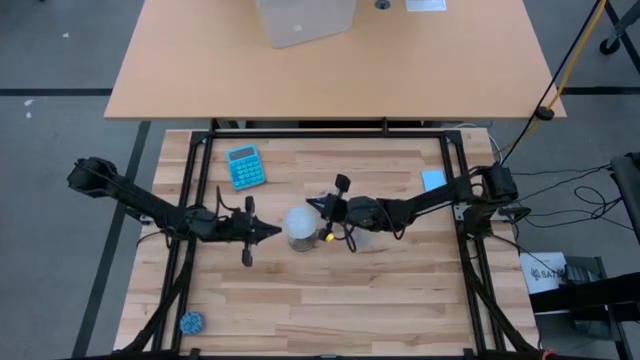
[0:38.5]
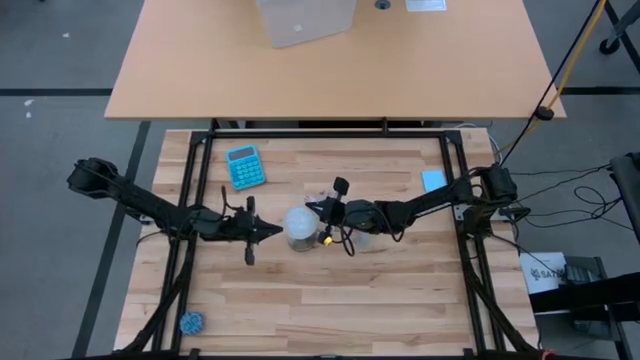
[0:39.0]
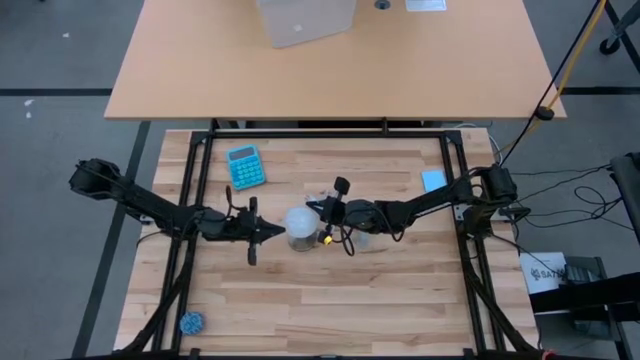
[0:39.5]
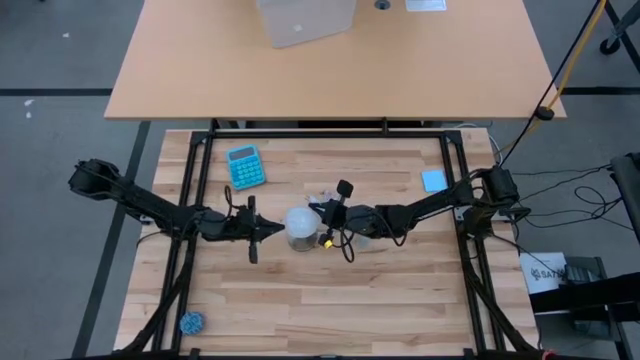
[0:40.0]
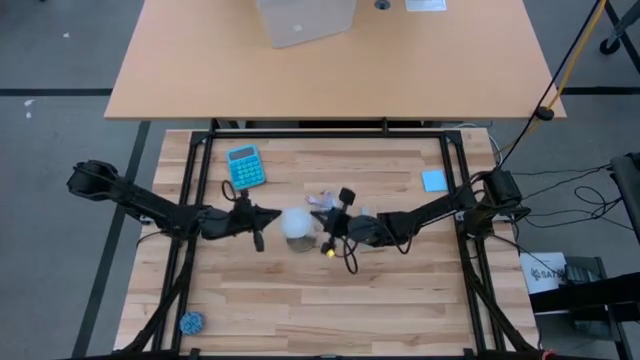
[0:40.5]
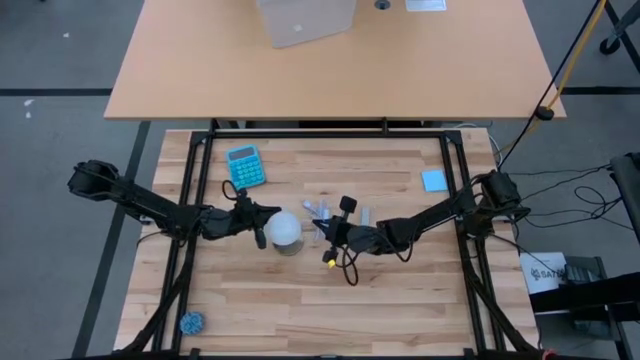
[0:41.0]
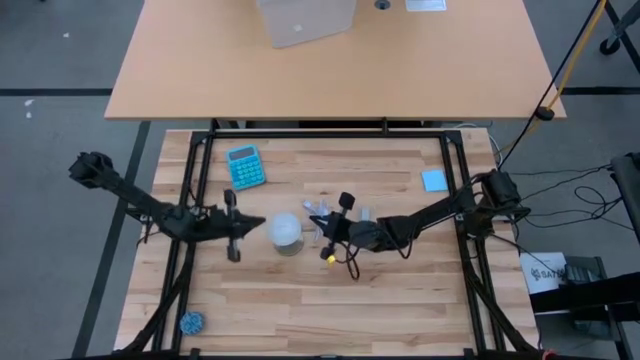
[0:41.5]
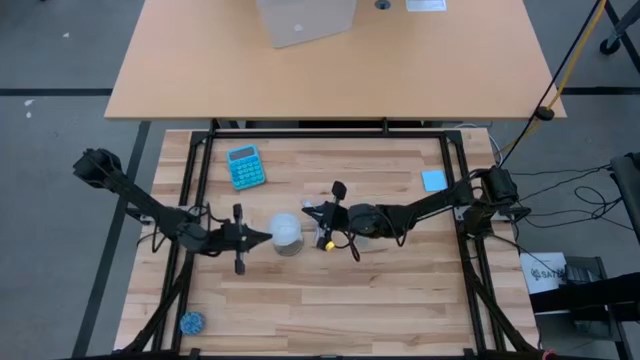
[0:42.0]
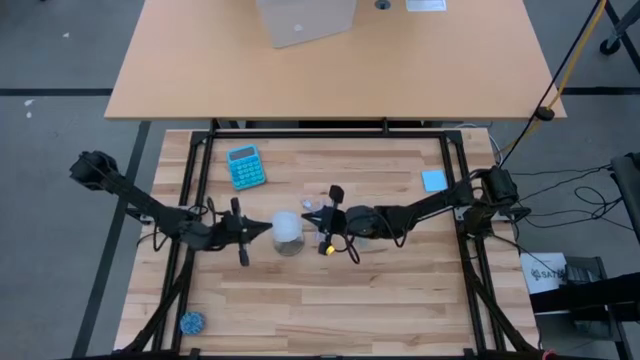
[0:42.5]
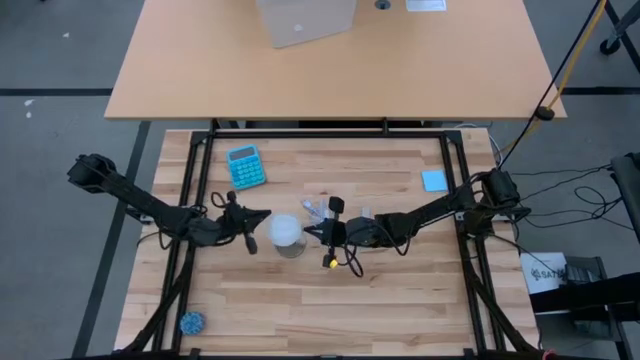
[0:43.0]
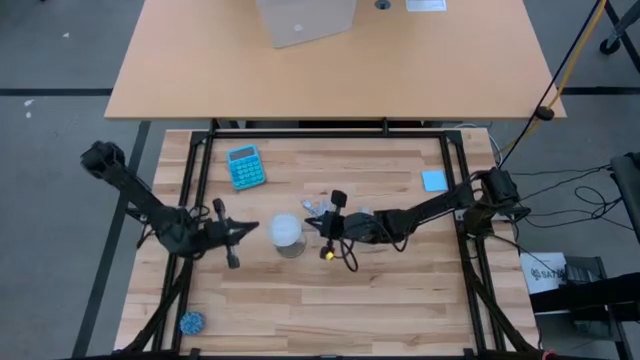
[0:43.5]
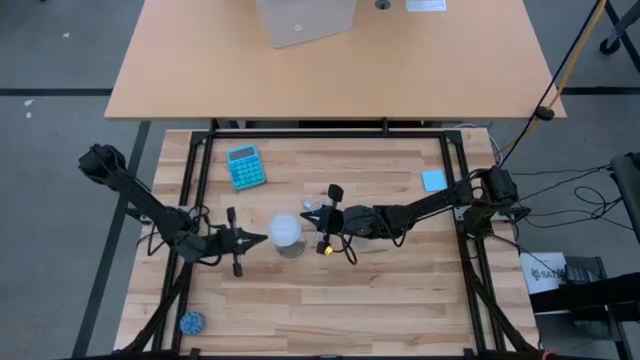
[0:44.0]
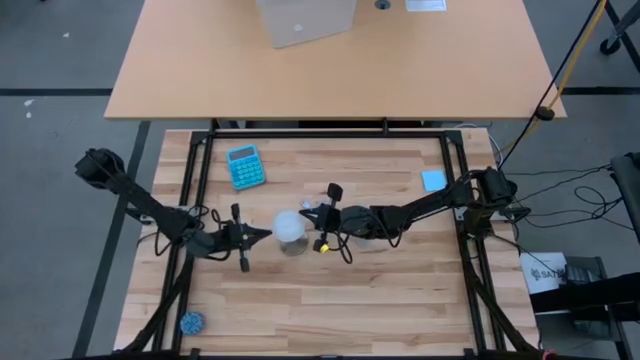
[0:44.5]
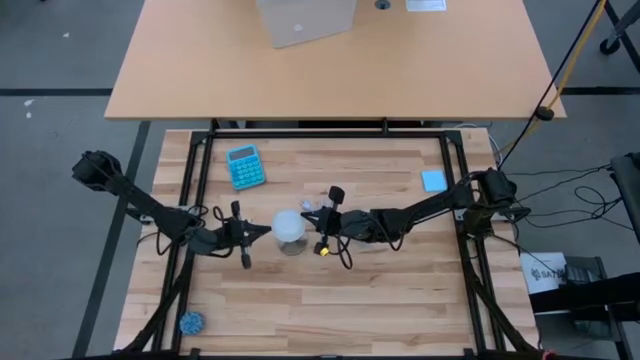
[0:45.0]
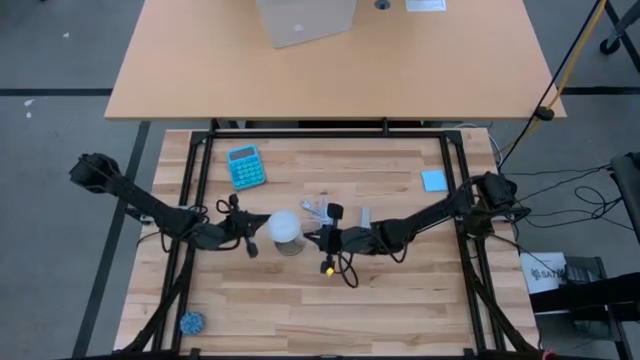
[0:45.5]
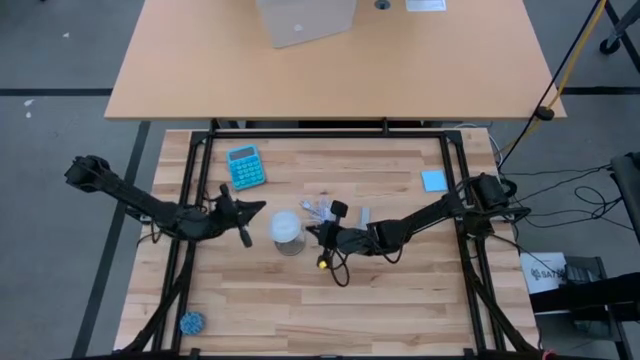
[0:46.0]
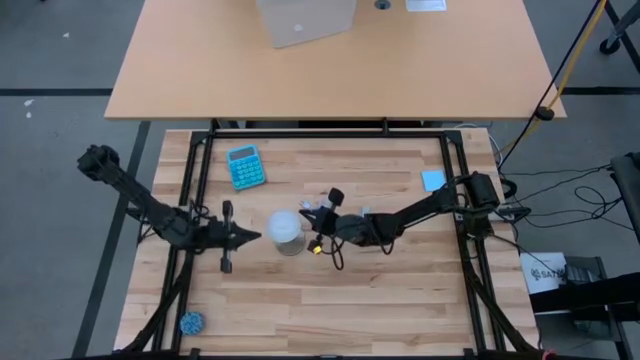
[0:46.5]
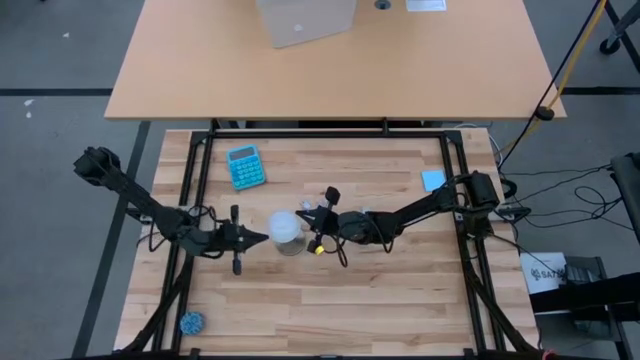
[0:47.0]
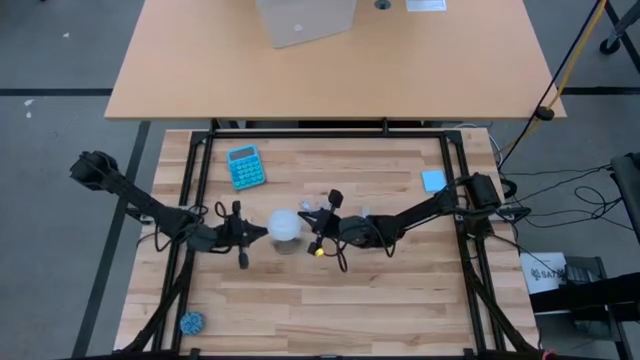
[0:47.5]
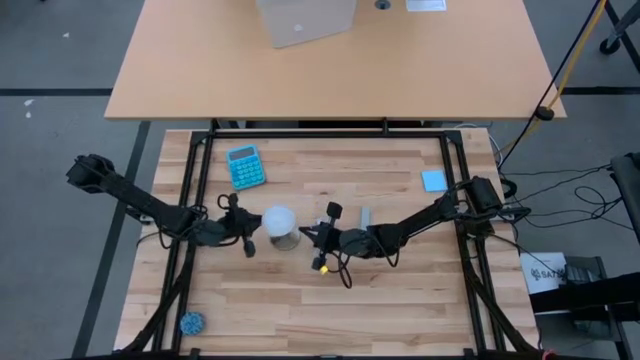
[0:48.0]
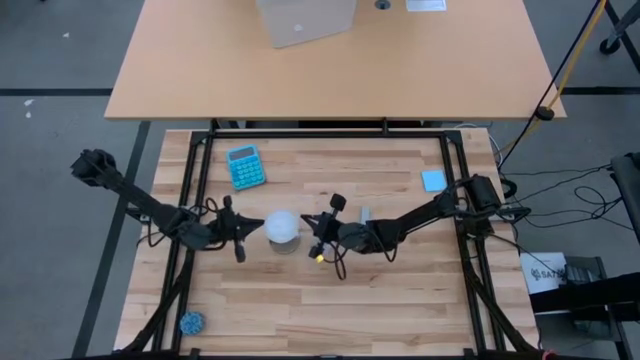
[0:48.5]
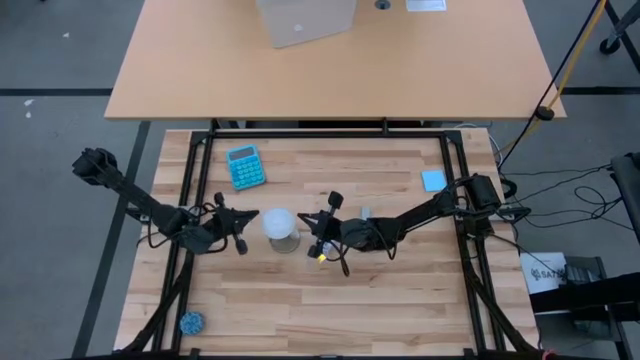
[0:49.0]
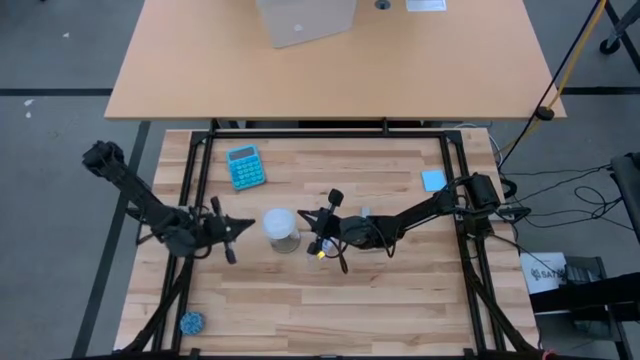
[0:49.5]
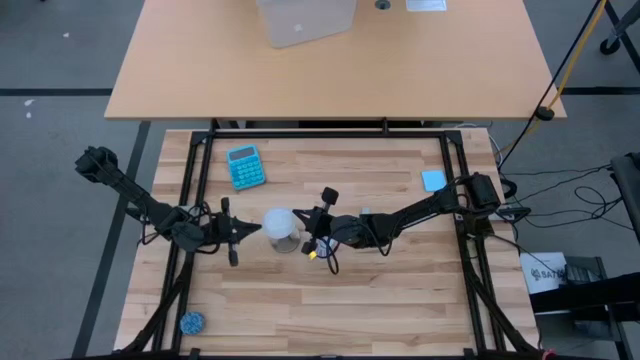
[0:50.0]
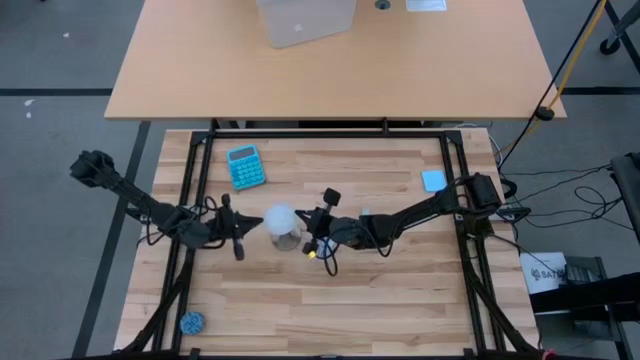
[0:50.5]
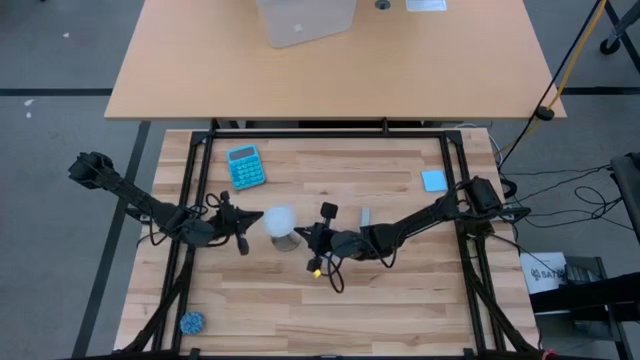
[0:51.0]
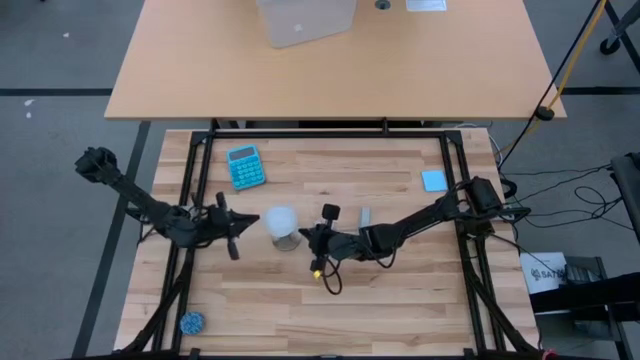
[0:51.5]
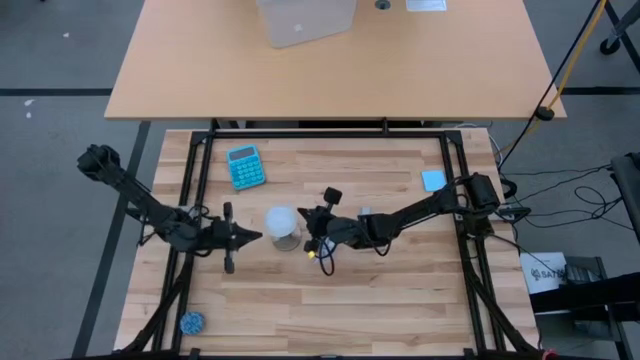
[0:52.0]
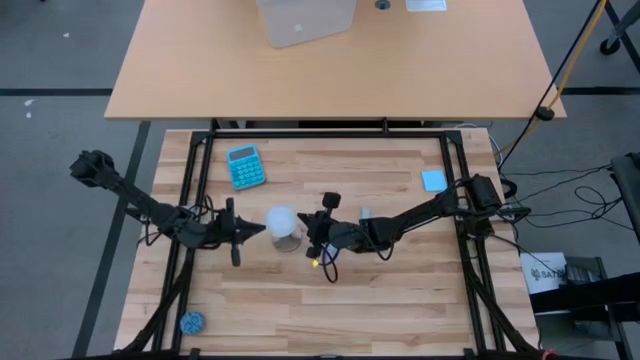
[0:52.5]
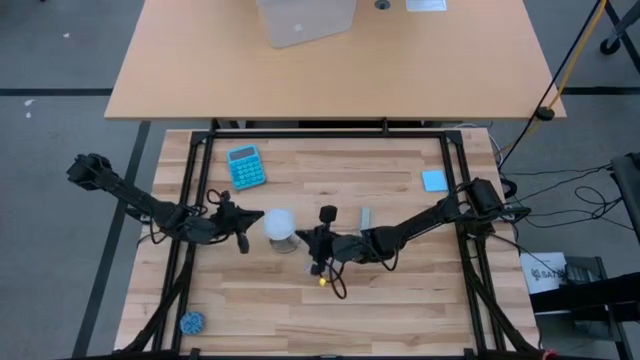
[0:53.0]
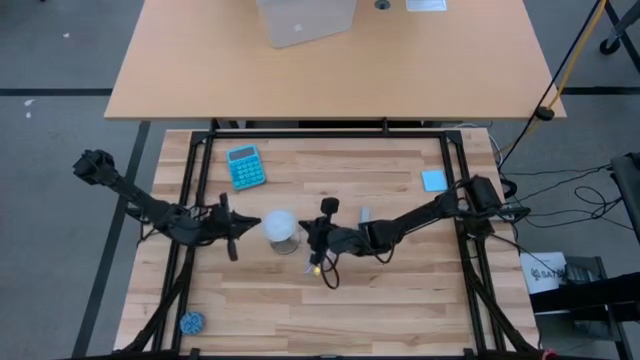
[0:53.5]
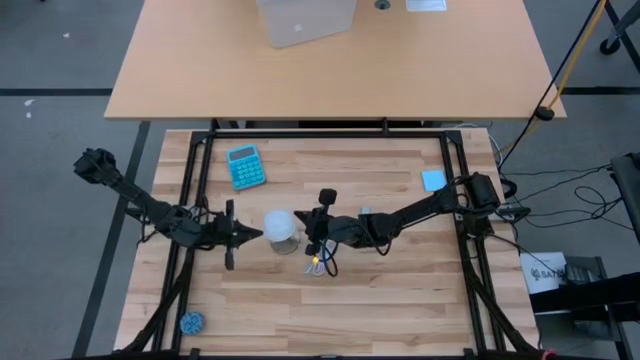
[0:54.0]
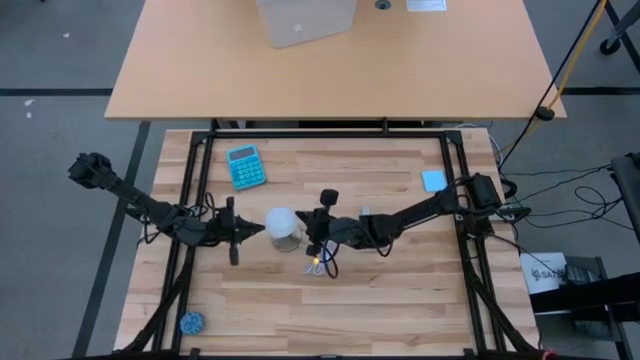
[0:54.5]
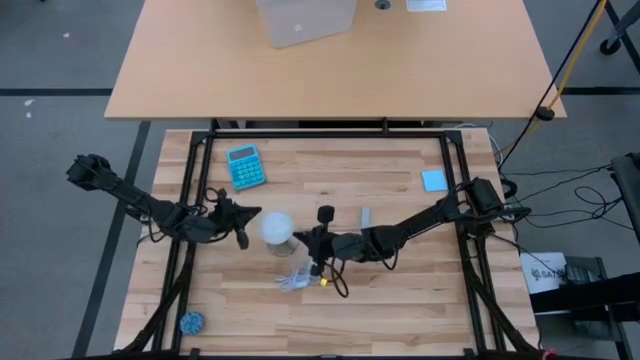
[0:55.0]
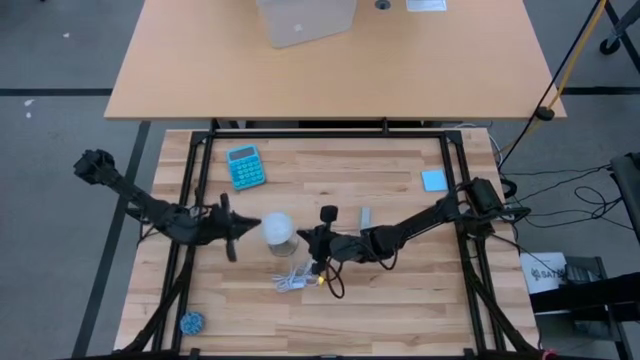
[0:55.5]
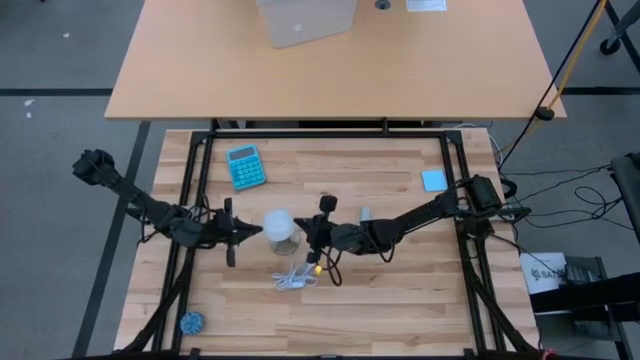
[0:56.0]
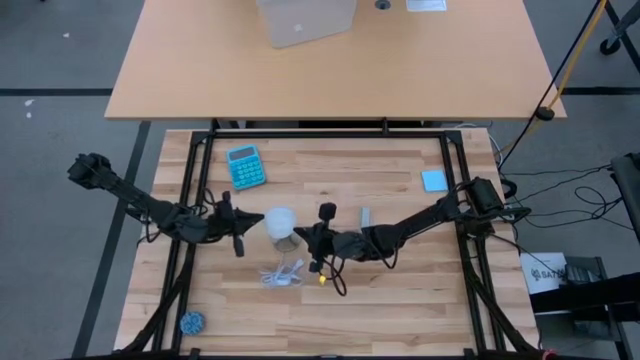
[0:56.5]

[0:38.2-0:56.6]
Task: Screw lightbulb
Insert the light bulb into the lamp
